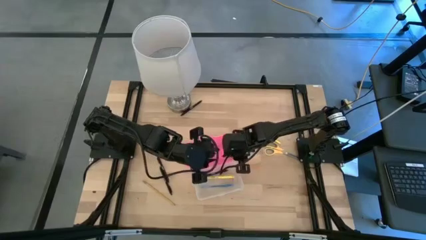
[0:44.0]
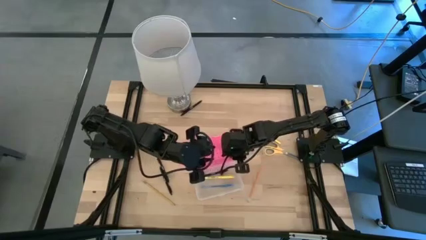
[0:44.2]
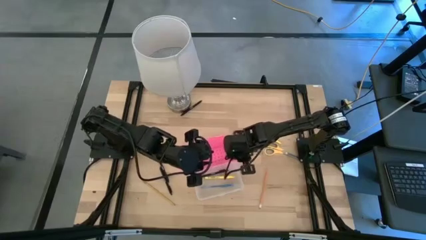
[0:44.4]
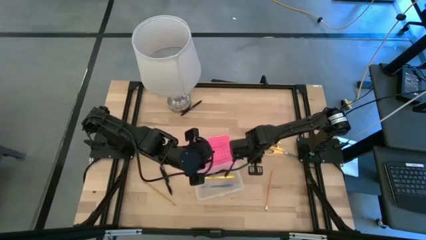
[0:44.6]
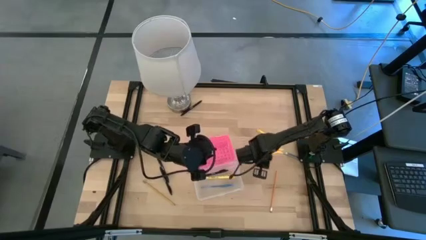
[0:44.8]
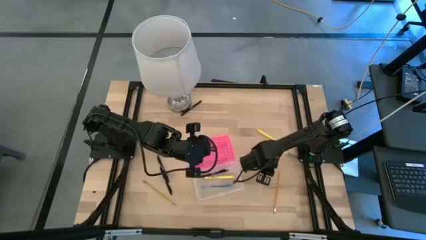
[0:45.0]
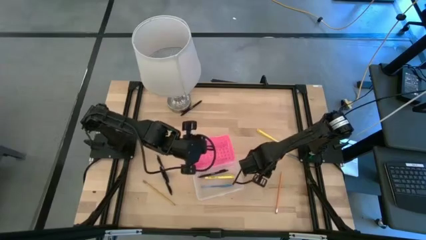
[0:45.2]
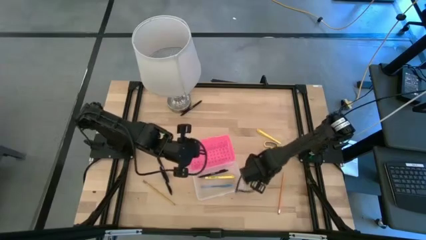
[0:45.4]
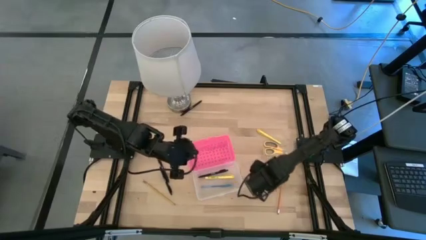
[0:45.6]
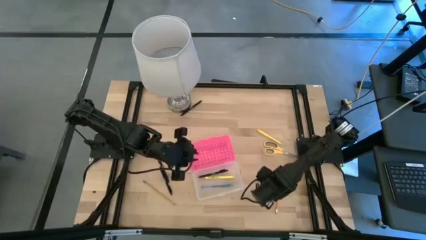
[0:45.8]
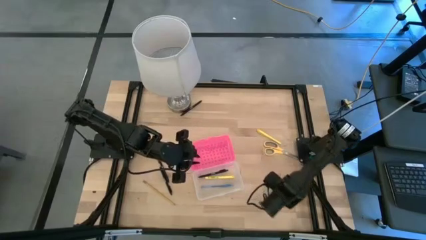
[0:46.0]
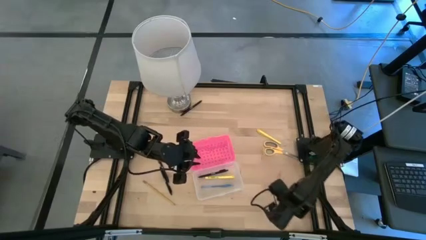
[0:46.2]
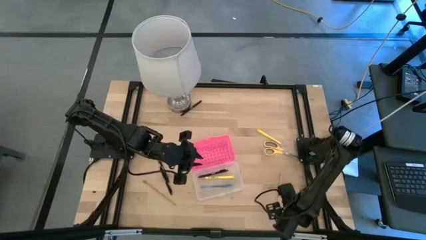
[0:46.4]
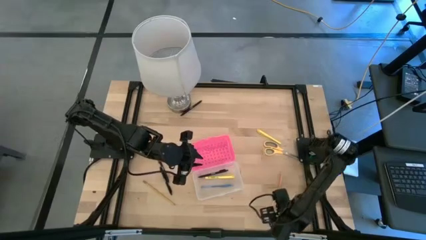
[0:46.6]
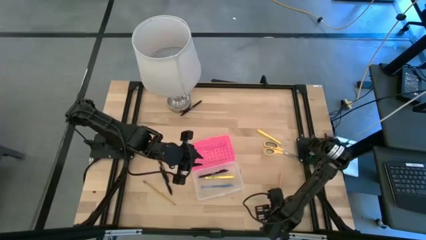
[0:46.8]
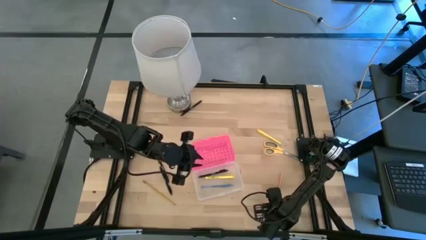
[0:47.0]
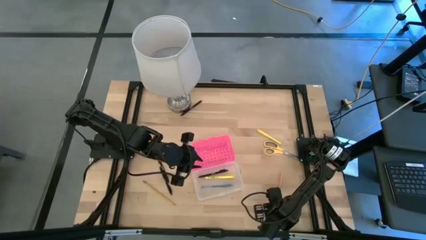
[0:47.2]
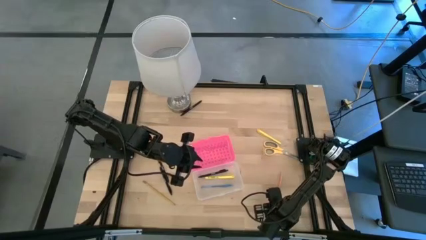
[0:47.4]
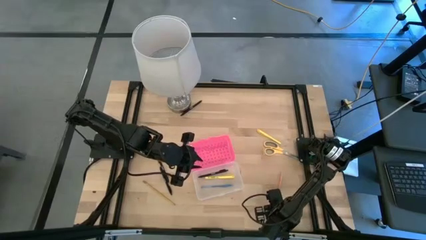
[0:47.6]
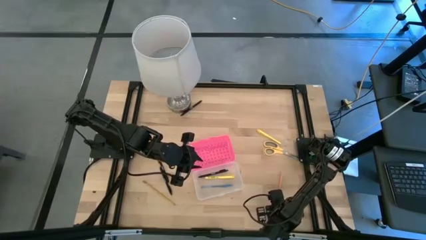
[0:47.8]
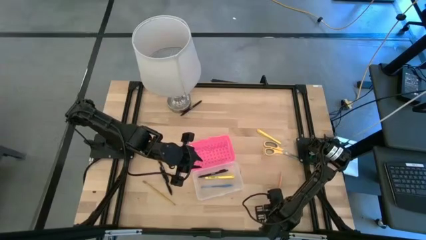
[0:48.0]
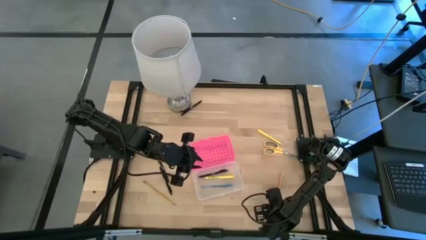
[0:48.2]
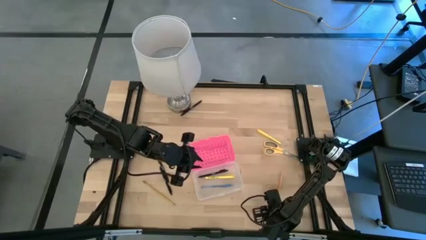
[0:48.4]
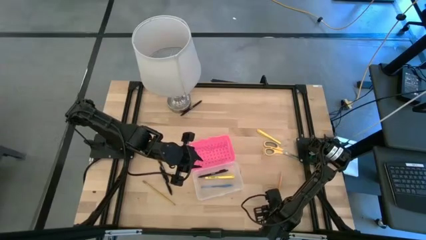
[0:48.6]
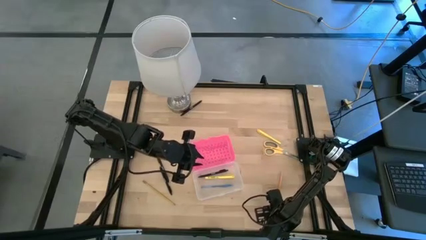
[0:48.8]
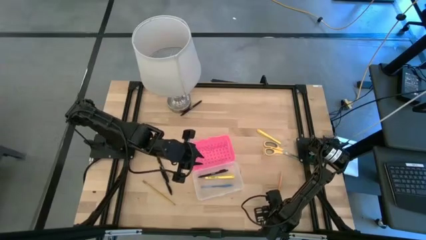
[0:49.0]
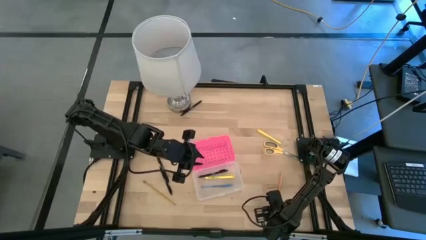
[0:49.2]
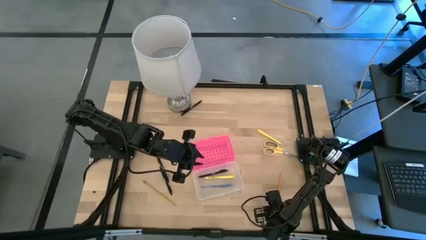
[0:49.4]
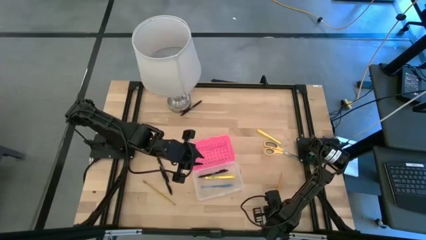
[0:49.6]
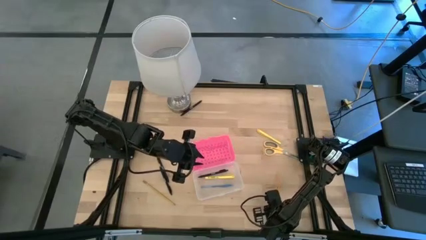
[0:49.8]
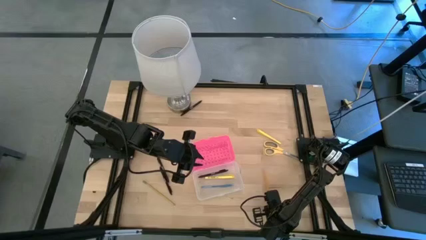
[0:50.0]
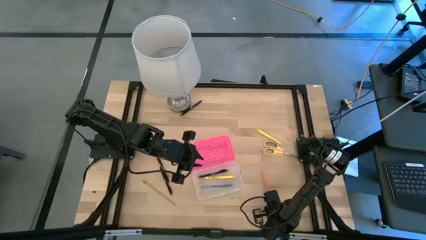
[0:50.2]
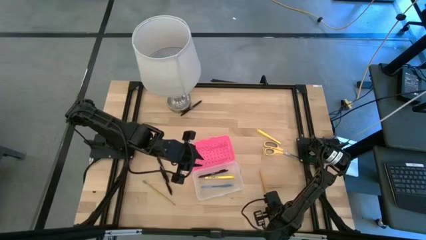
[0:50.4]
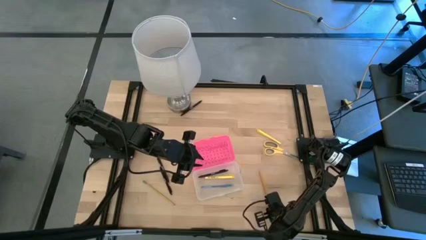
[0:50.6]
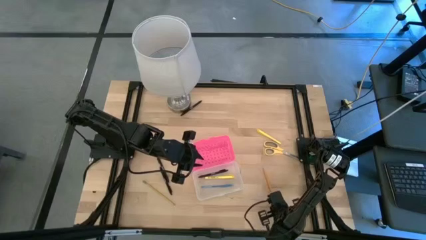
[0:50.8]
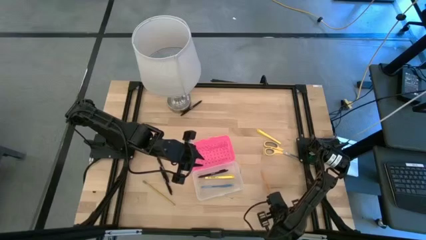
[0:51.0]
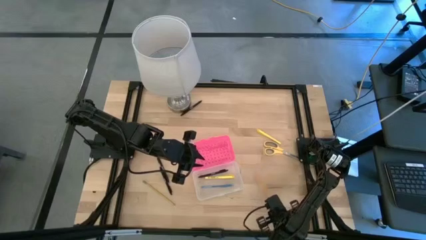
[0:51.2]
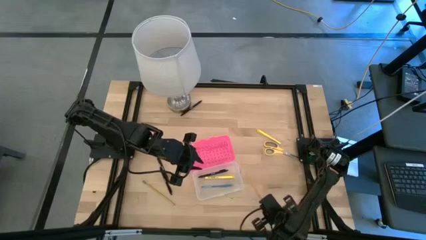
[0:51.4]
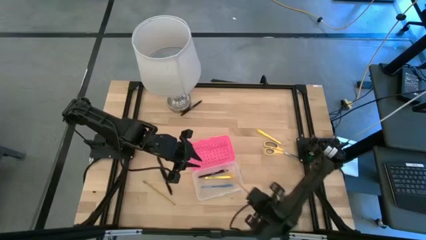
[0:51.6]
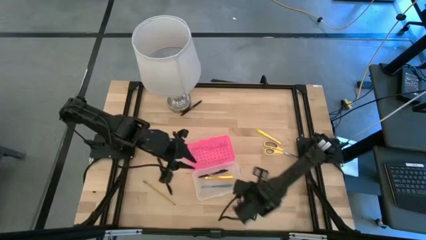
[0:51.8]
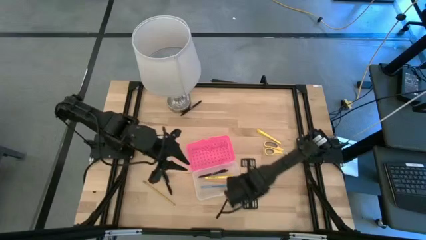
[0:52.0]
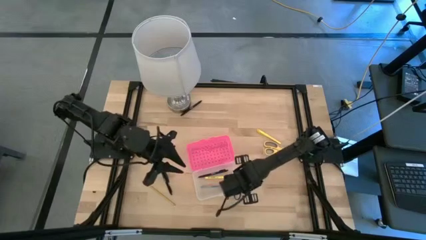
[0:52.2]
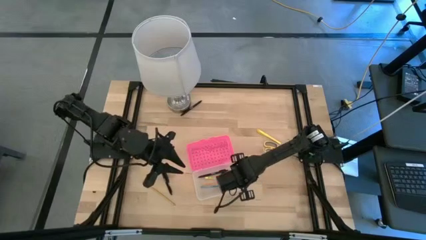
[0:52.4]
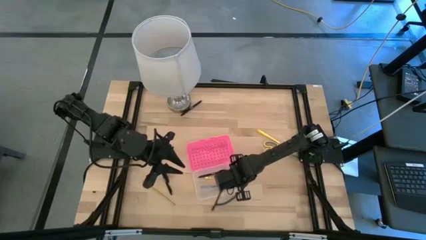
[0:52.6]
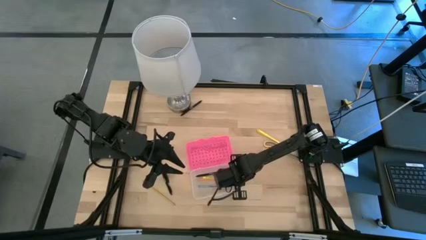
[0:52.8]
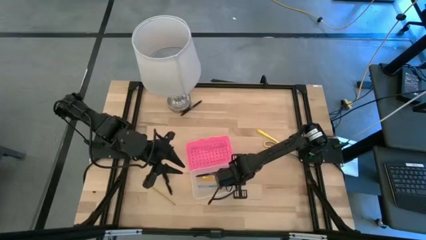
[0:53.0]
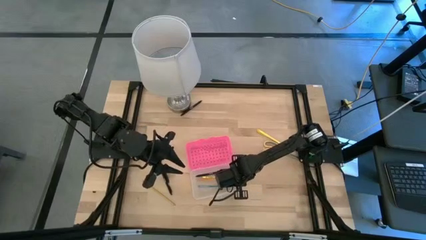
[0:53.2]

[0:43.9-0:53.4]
Task: Pick & place school supplies into a supply box
Put the orange pencil into the transparent supply box

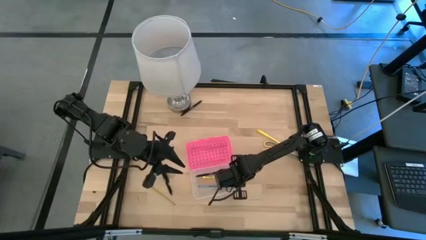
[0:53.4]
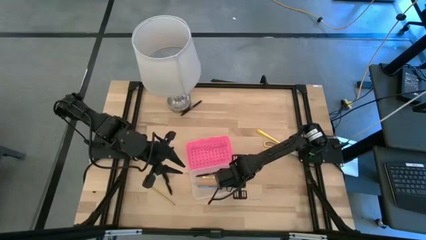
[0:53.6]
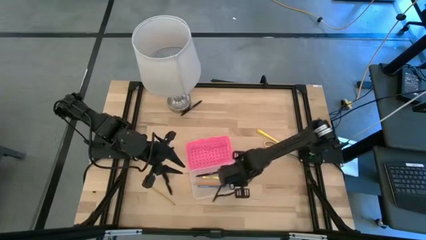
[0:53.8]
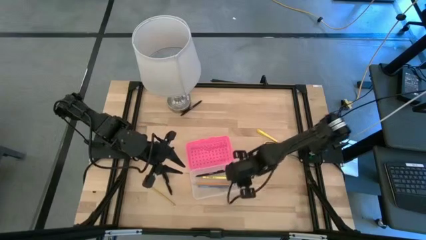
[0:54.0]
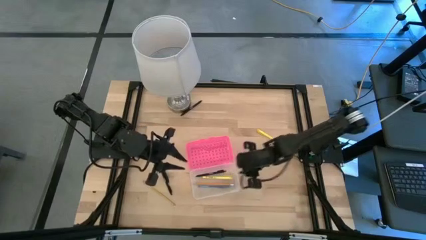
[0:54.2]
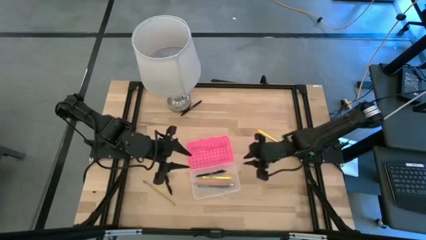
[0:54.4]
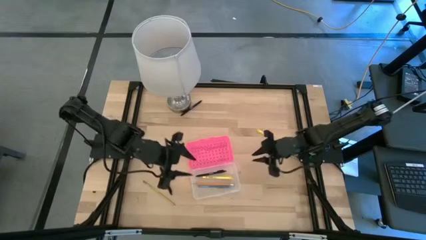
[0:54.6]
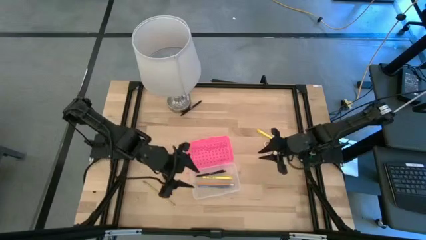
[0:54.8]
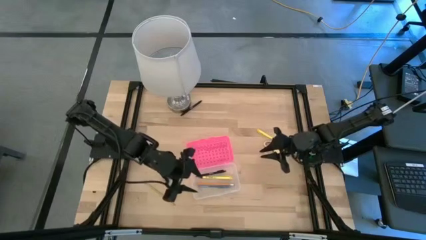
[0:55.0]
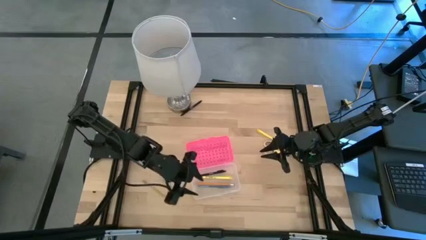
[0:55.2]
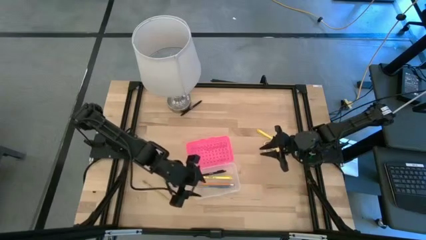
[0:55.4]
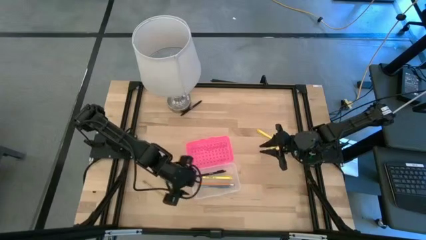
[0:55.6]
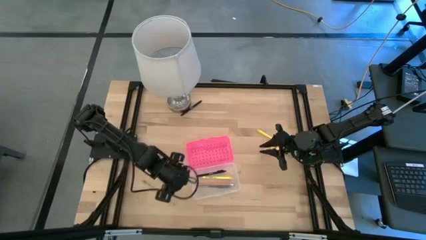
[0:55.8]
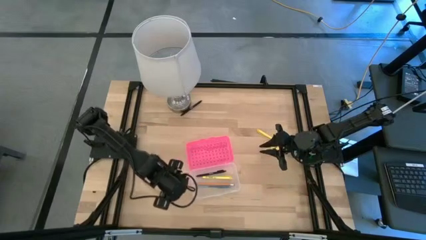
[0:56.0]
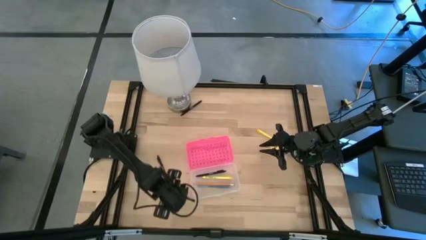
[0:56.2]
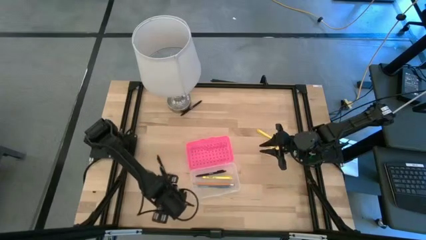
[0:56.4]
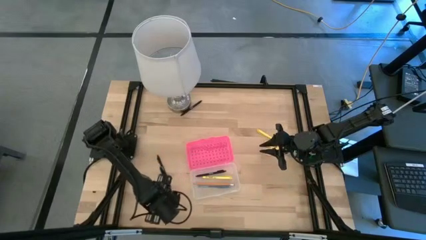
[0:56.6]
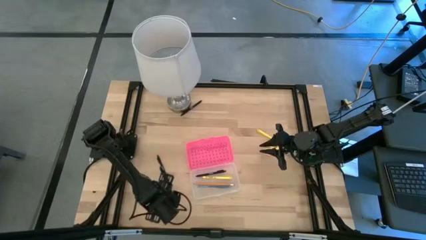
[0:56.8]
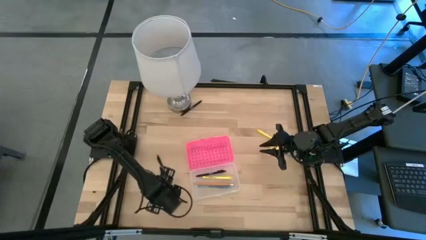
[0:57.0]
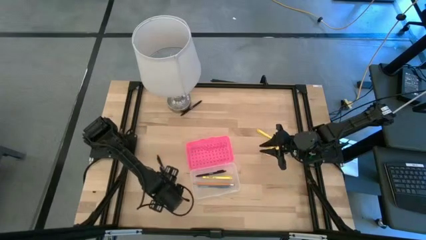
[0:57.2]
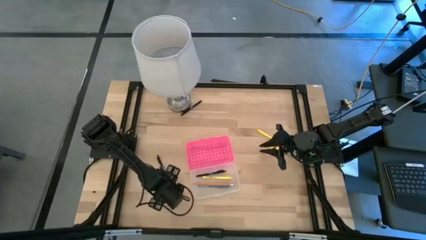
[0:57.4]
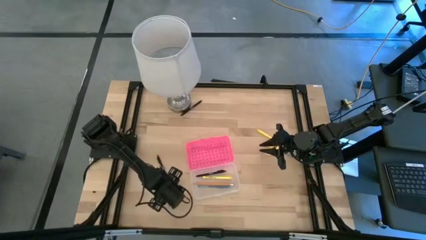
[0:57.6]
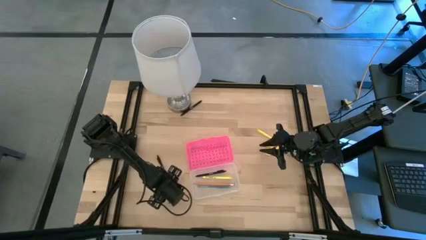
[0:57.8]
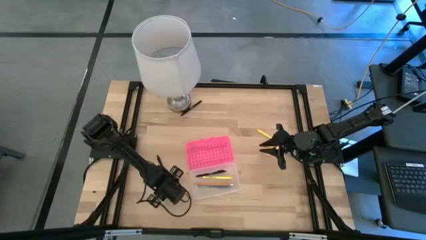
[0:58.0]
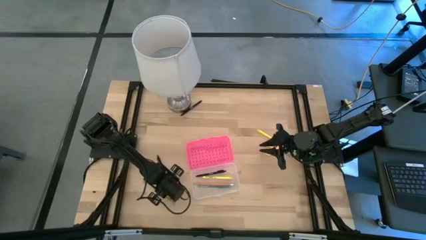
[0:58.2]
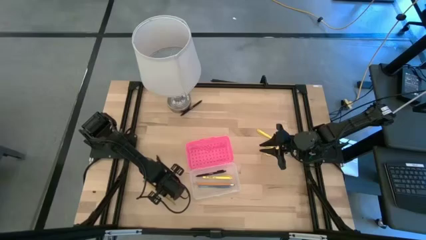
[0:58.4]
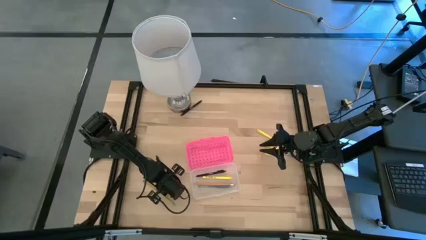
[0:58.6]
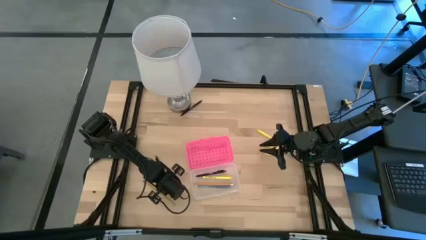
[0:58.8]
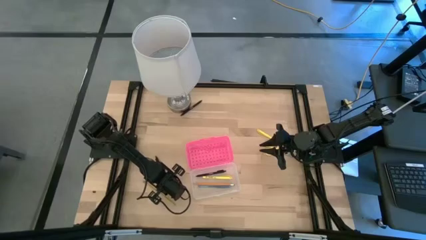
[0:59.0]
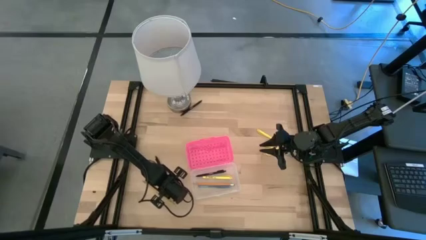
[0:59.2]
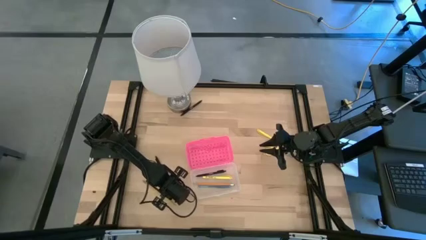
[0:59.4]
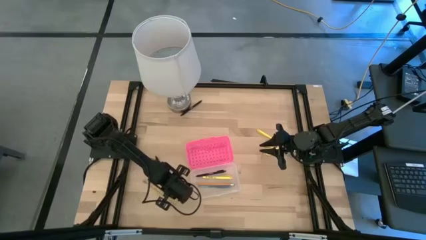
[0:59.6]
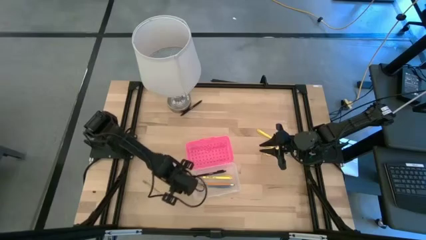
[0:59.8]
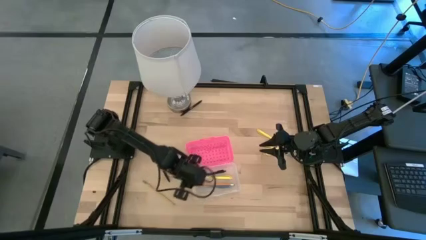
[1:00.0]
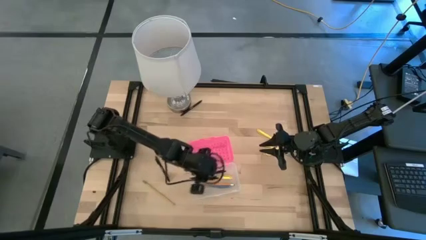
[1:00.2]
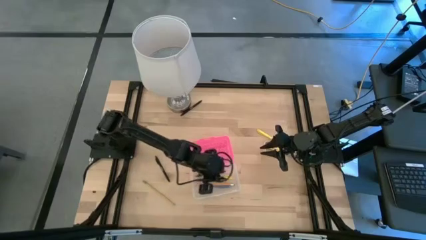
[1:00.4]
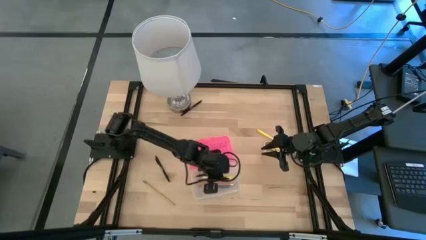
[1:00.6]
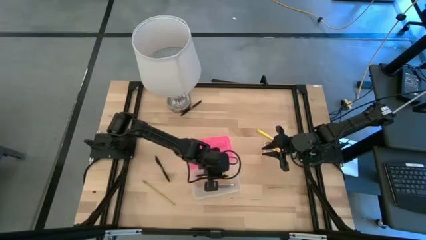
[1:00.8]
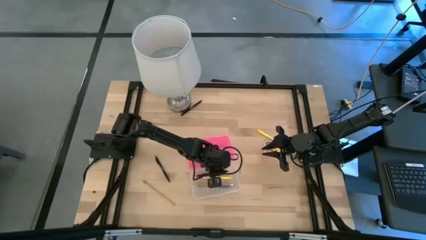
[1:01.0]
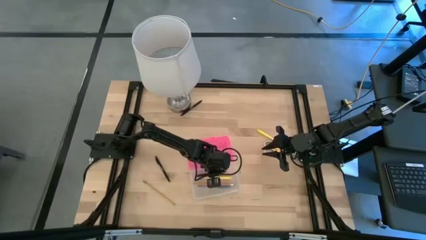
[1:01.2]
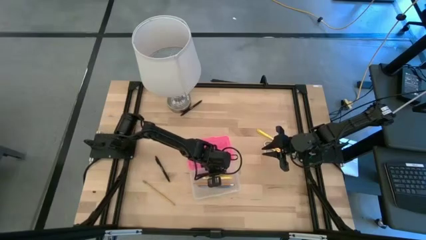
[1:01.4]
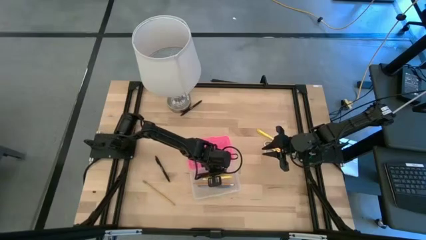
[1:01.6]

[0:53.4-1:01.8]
Put the black pen into the transparent supply box
